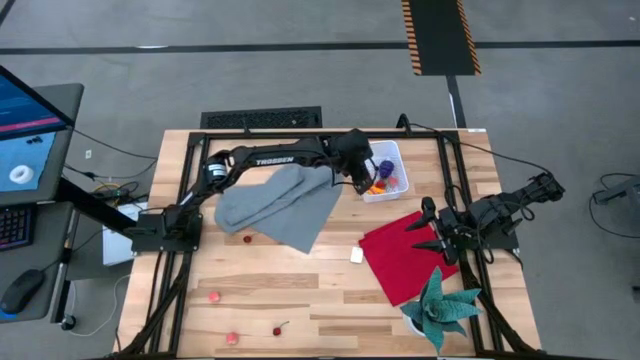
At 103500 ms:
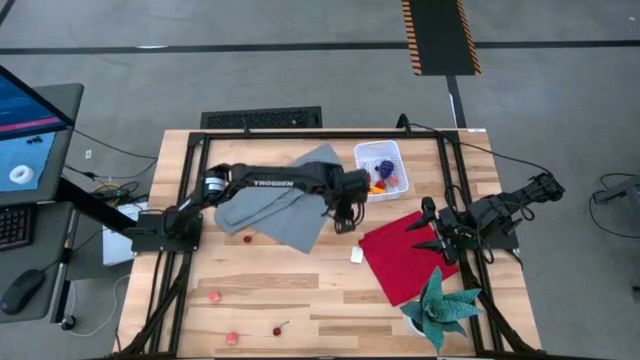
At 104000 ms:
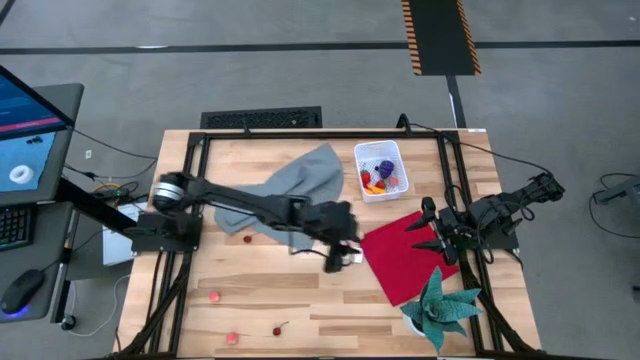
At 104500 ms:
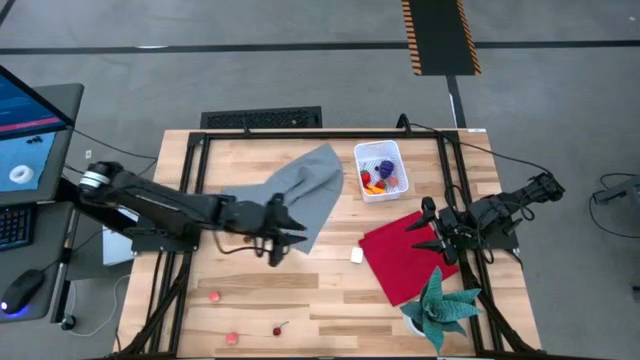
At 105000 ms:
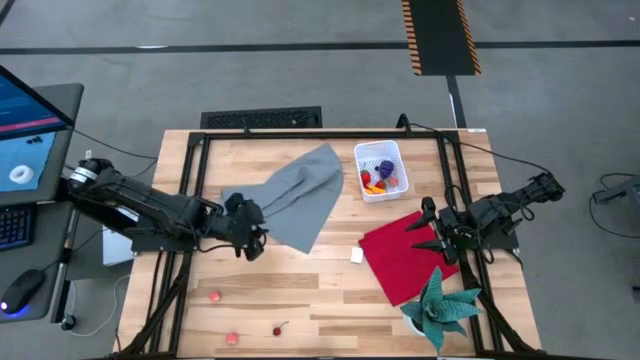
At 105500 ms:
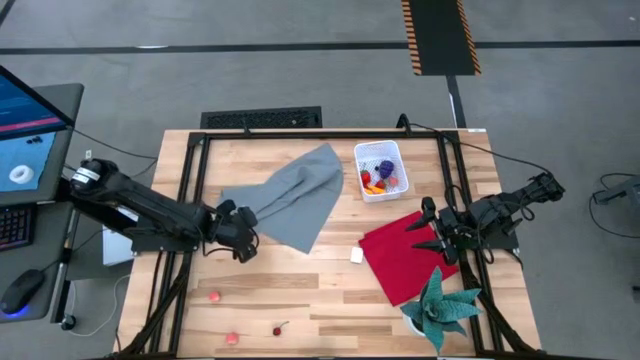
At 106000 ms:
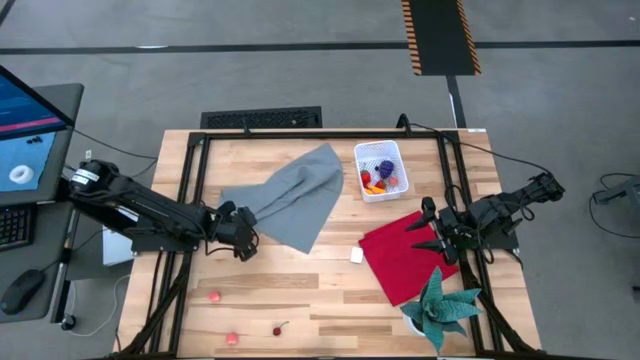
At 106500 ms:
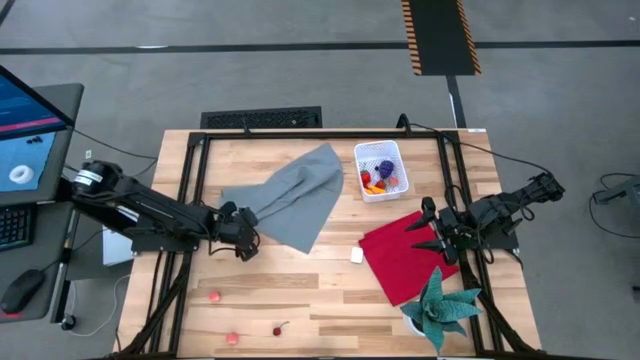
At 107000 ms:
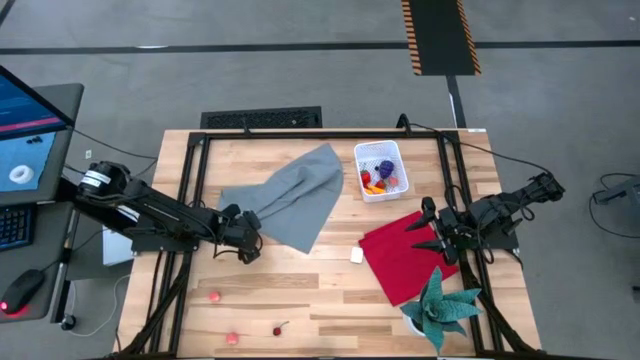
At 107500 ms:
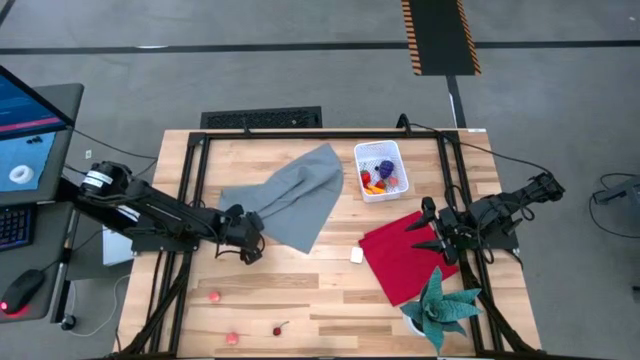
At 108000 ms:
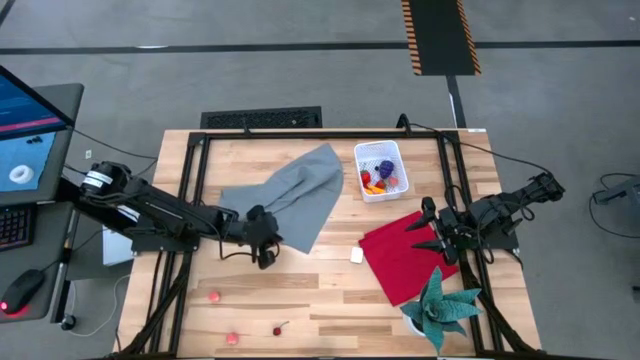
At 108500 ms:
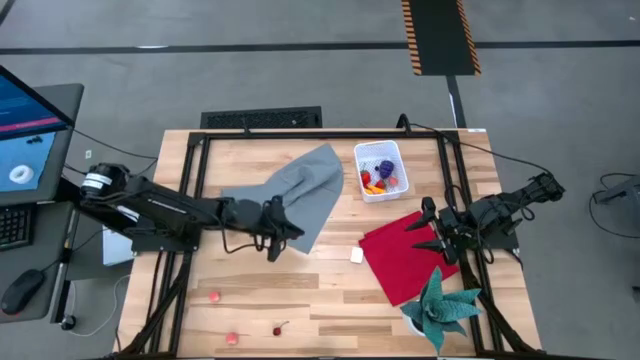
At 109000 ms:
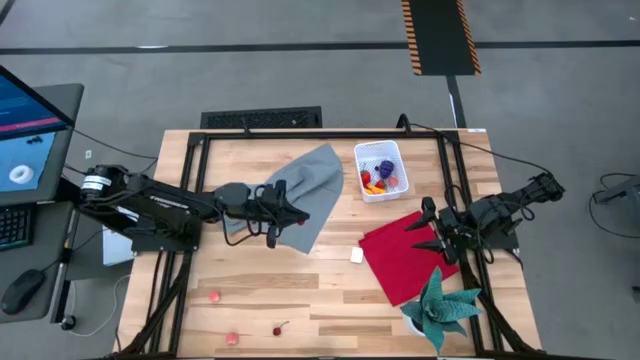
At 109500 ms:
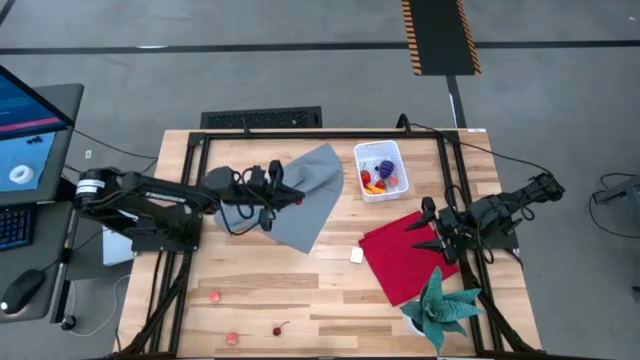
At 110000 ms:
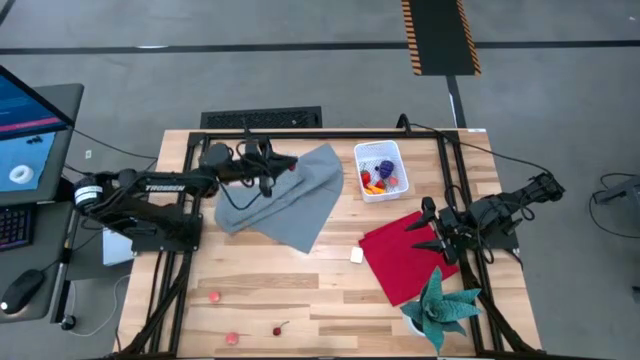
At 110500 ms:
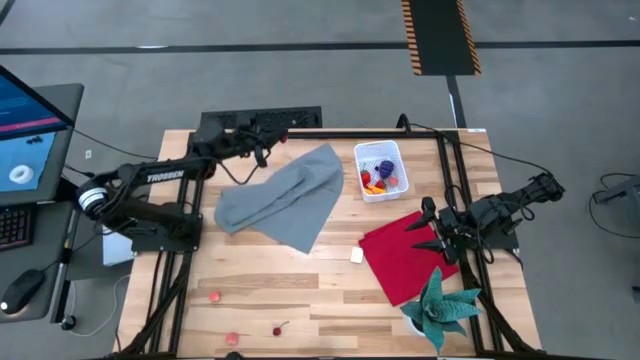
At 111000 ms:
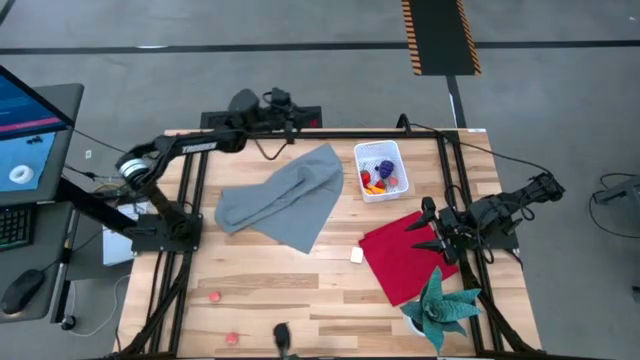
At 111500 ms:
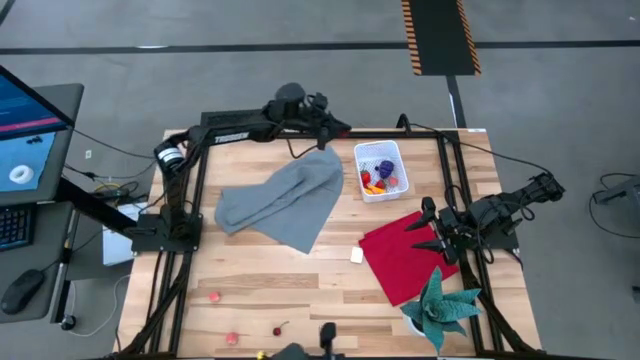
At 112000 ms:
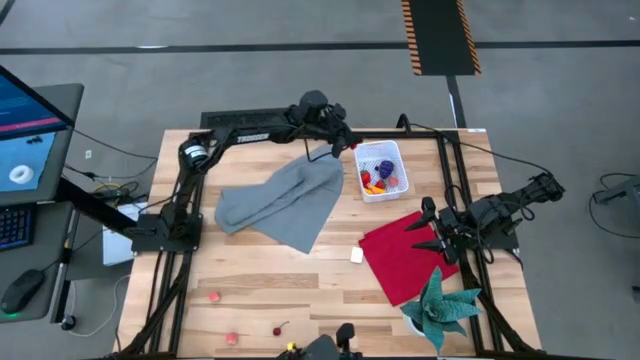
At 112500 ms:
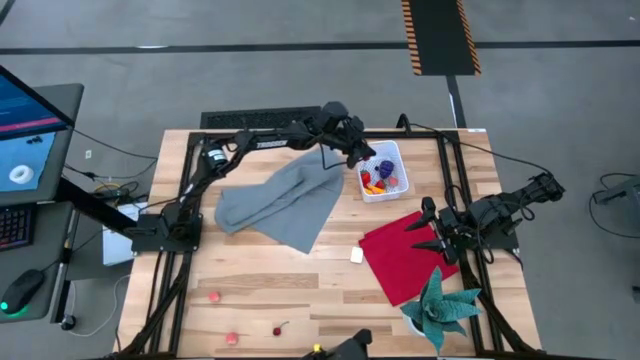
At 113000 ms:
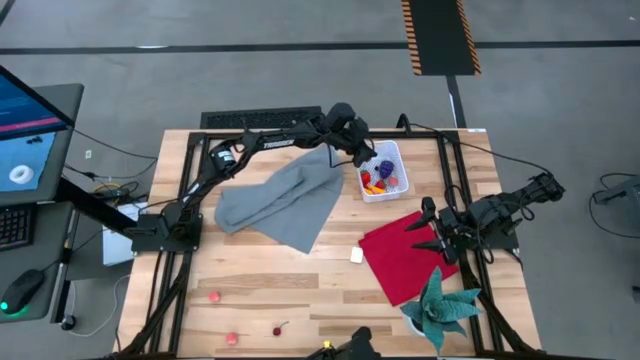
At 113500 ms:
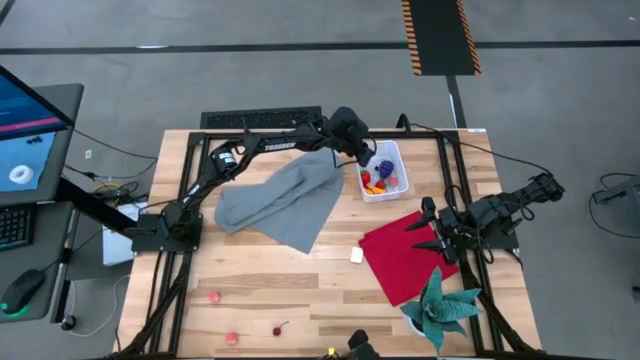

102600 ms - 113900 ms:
Task: Pick and placing Produce into tupperware
Put the red cherry into the white bin

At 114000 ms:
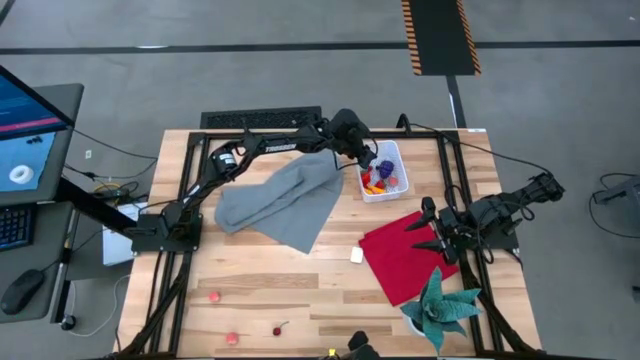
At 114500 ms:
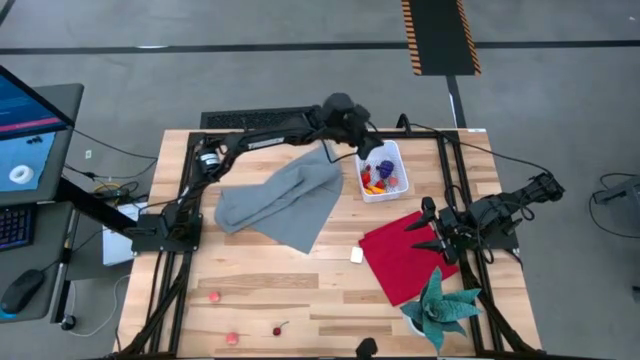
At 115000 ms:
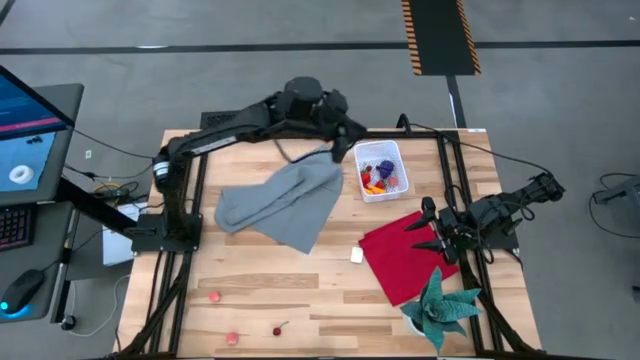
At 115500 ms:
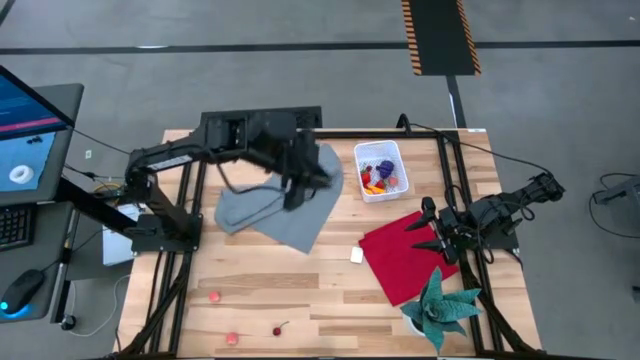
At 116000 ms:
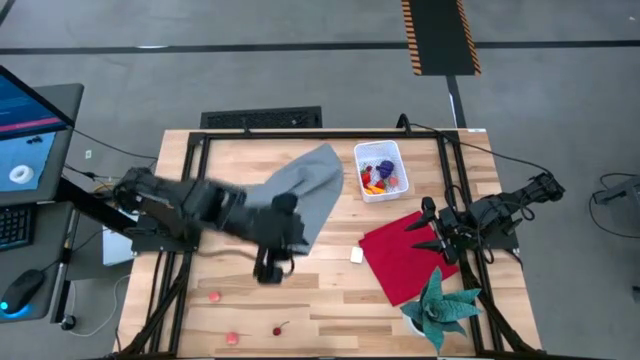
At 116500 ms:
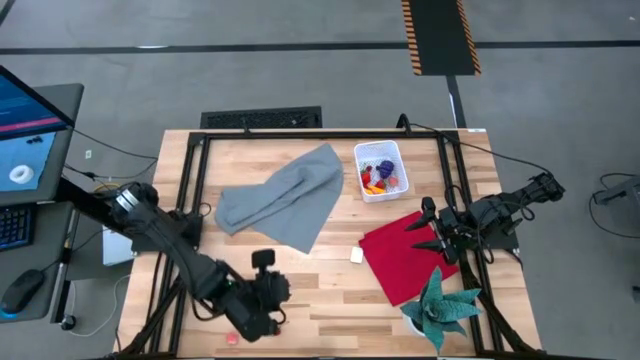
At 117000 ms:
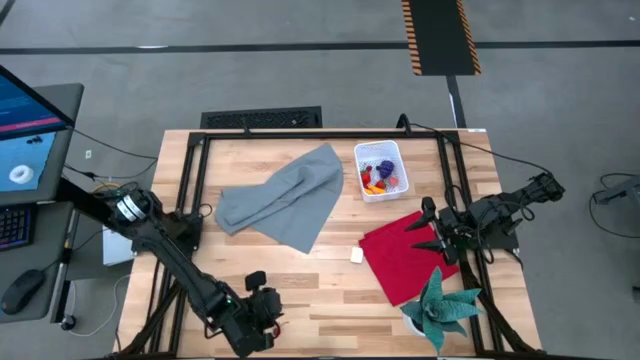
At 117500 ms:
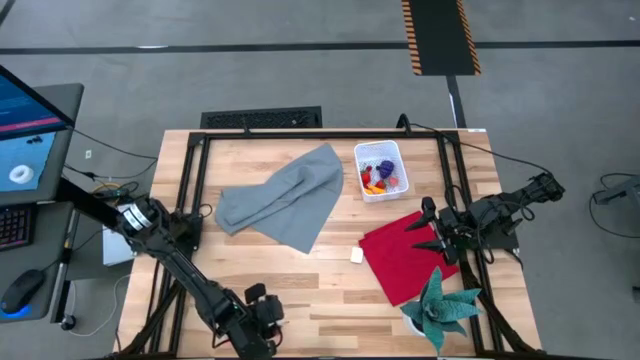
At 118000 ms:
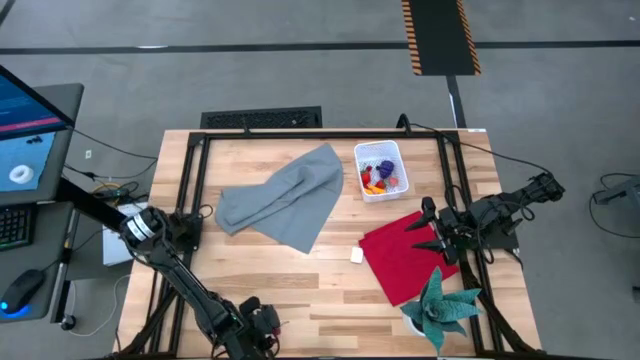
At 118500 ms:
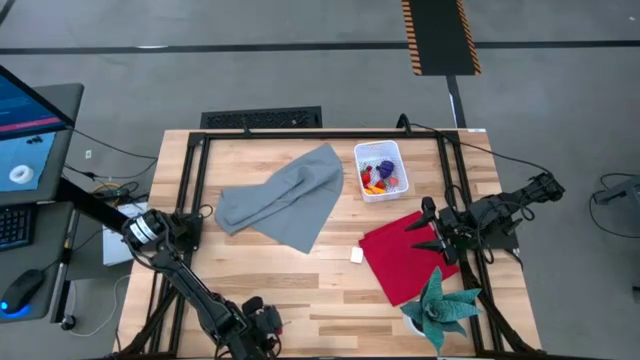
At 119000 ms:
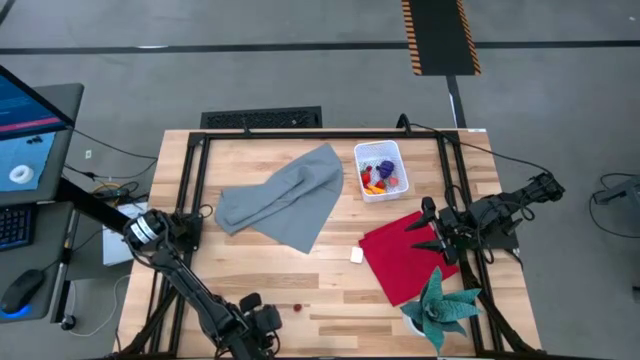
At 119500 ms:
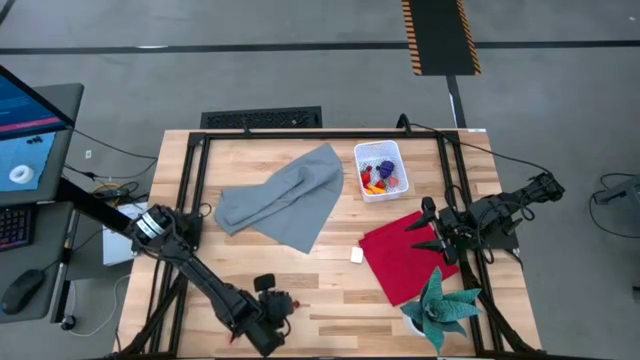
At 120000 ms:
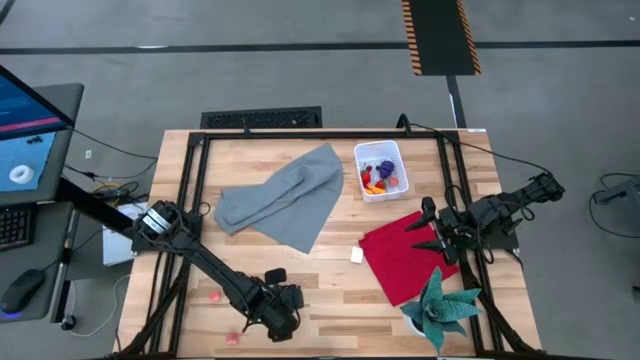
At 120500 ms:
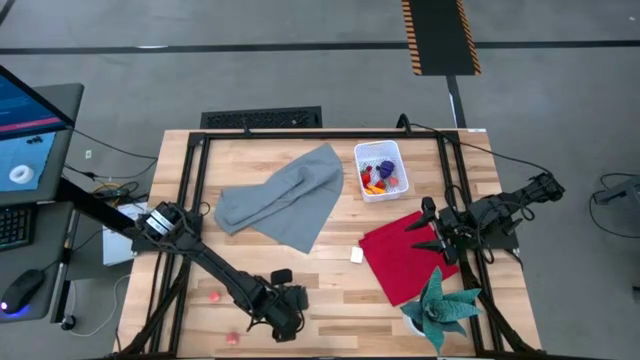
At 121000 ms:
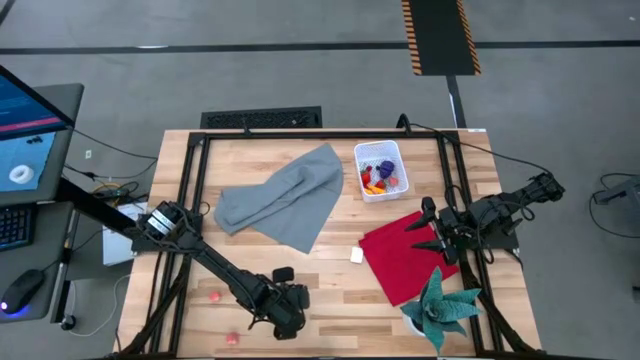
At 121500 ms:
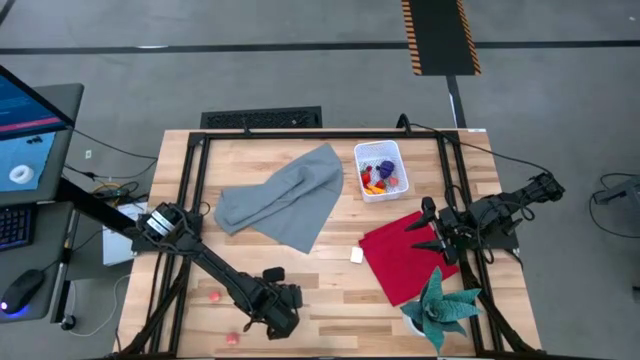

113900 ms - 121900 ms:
Put the red cherry into the white bin

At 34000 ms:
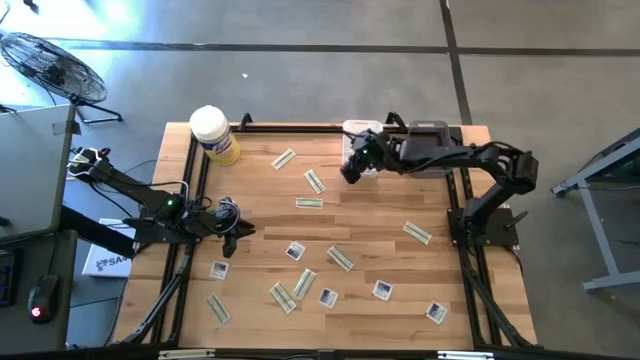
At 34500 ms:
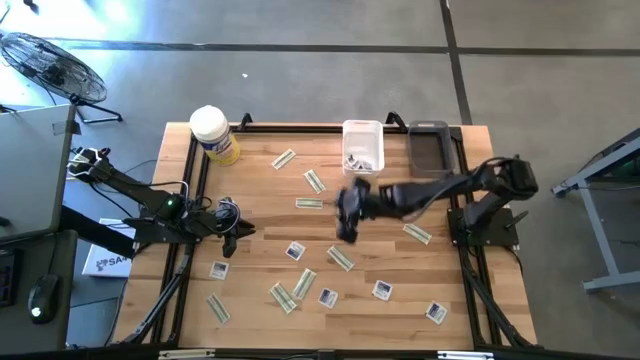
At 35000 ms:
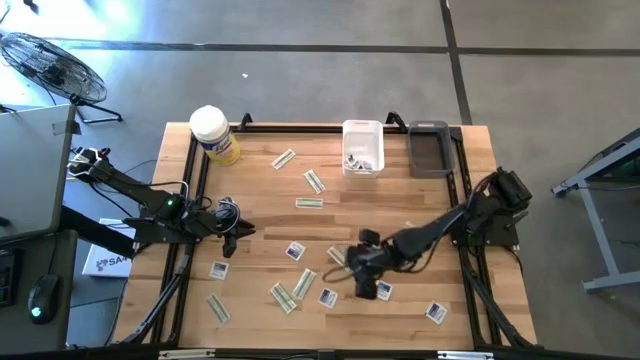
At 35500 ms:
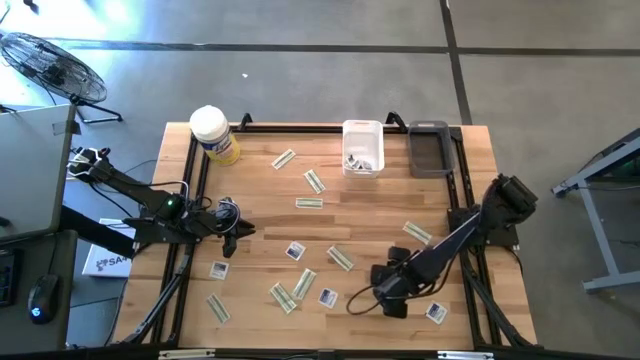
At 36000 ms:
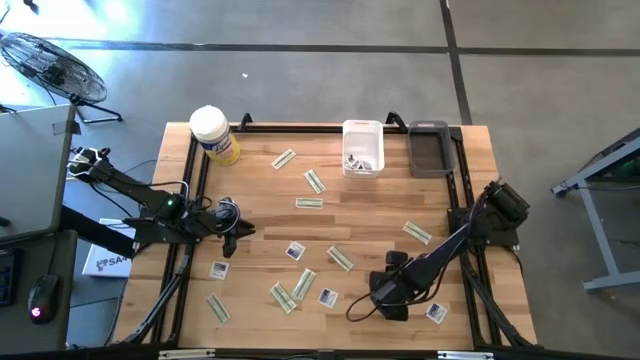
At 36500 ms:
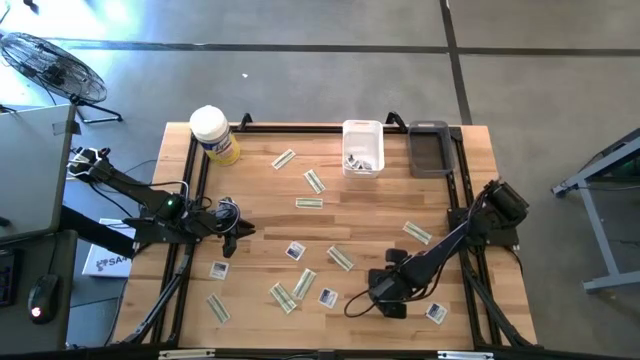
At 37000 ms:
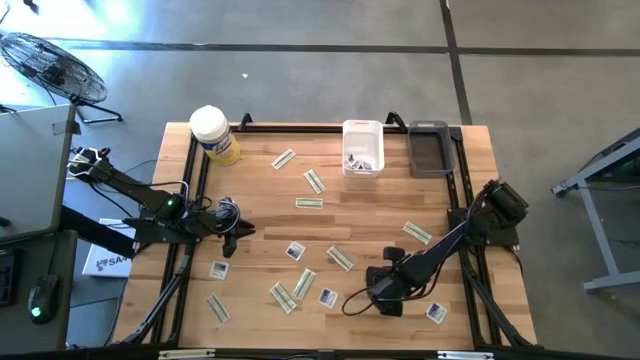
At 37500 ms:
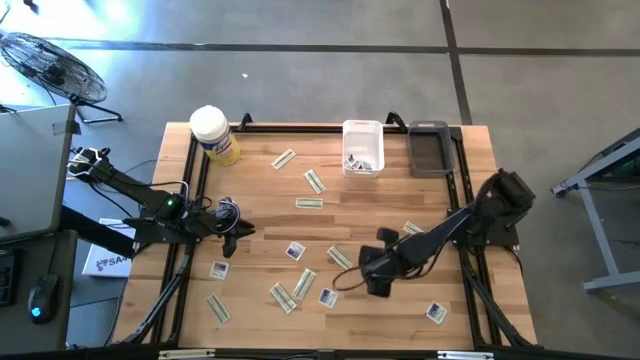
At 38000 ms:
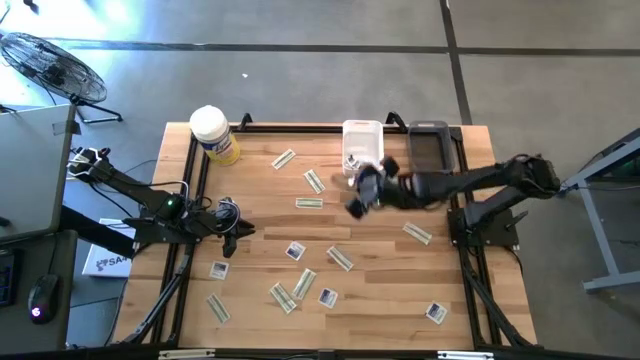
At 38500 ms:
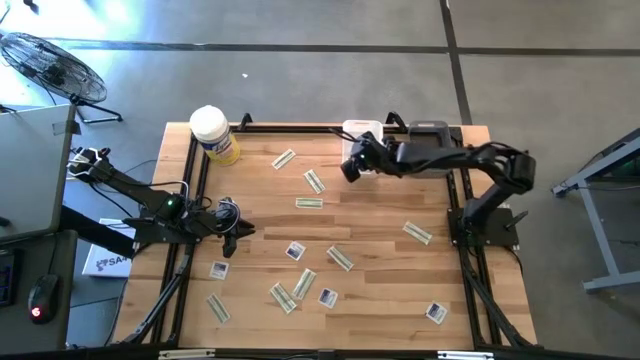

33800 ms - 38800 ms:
Task: Pick & Place First Aid Supplies
Put the blue alcohol pad into the white bin
